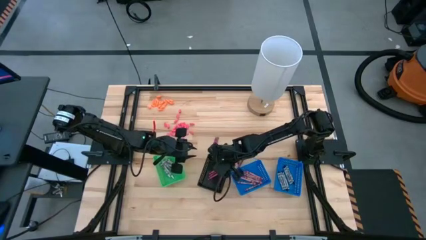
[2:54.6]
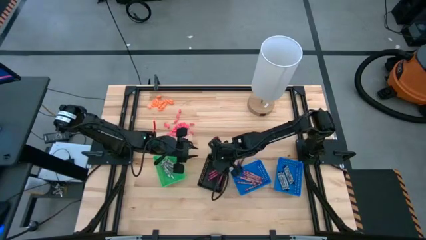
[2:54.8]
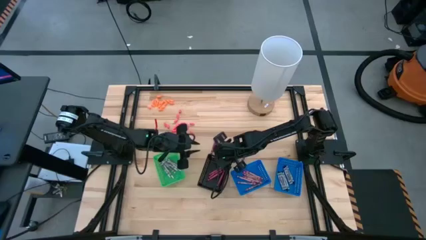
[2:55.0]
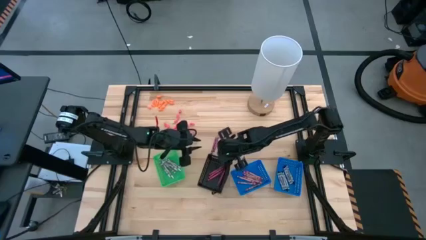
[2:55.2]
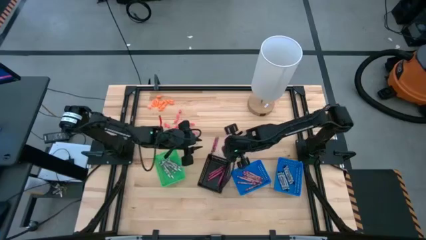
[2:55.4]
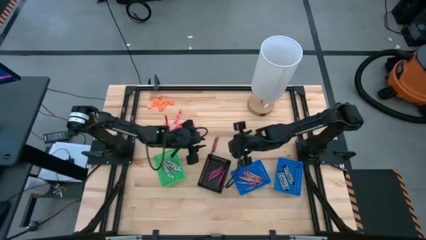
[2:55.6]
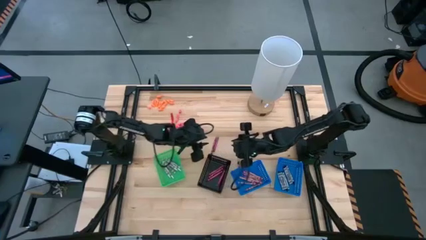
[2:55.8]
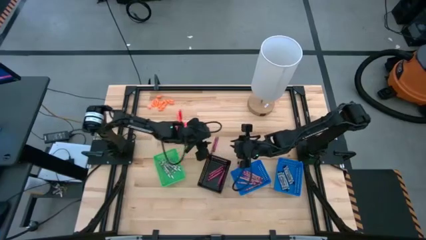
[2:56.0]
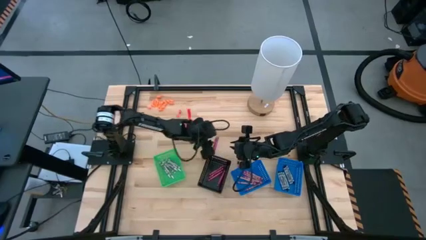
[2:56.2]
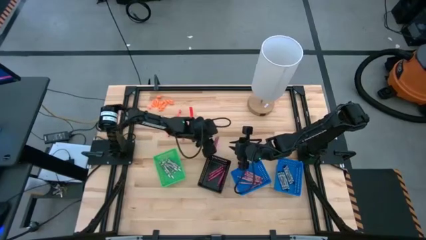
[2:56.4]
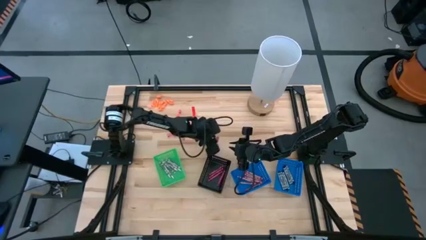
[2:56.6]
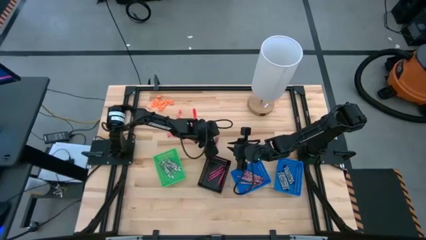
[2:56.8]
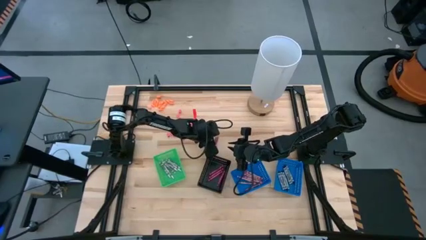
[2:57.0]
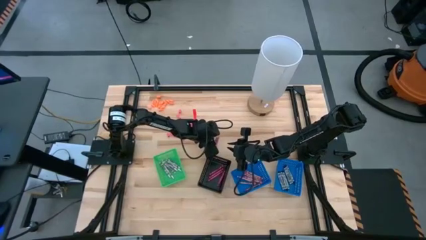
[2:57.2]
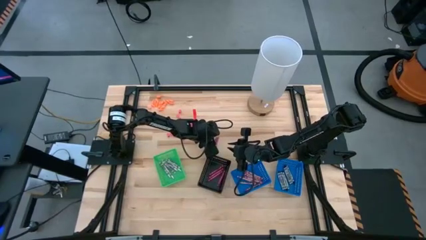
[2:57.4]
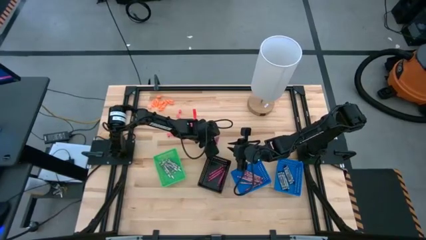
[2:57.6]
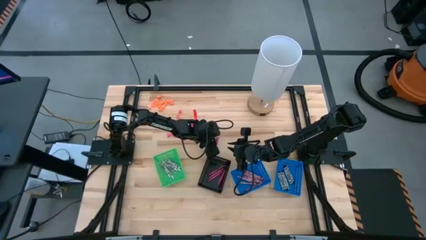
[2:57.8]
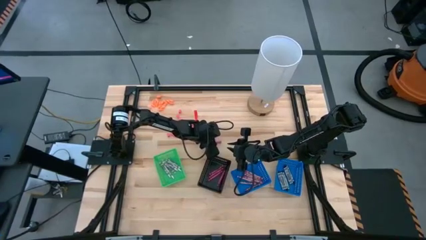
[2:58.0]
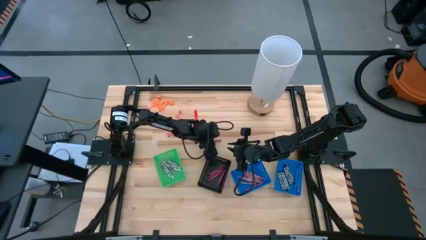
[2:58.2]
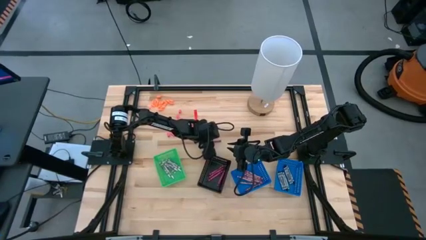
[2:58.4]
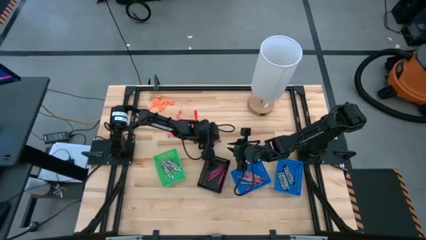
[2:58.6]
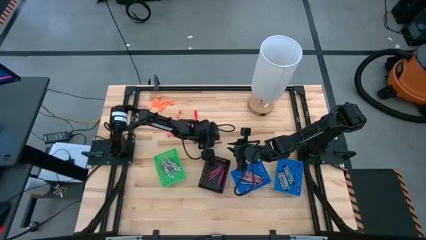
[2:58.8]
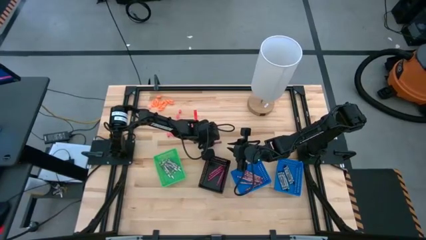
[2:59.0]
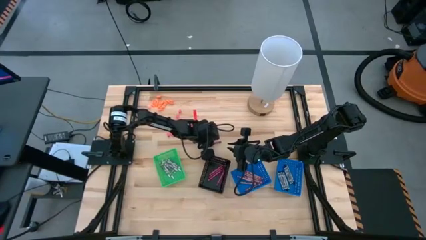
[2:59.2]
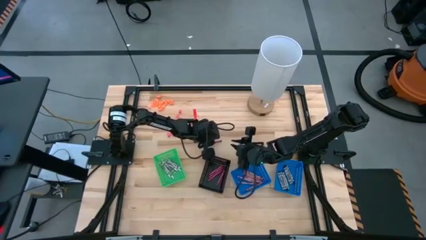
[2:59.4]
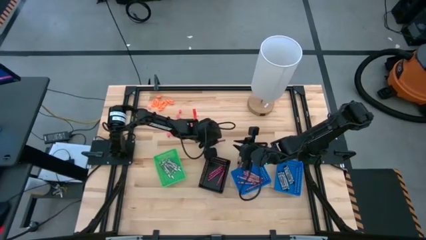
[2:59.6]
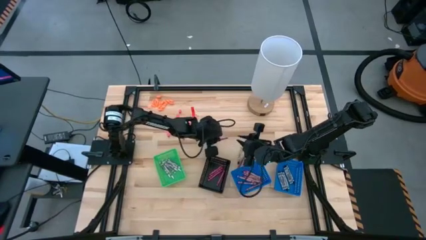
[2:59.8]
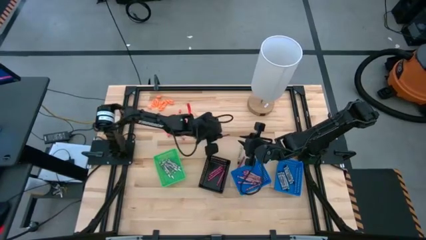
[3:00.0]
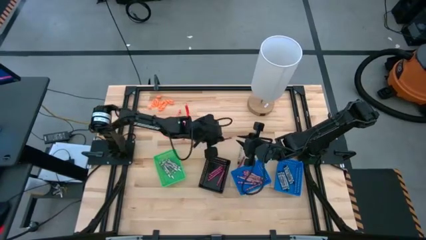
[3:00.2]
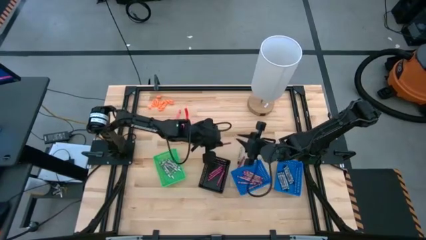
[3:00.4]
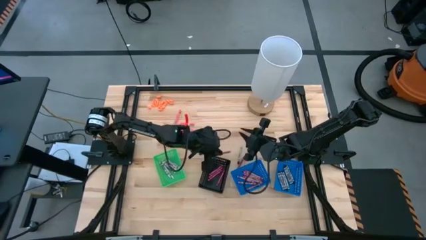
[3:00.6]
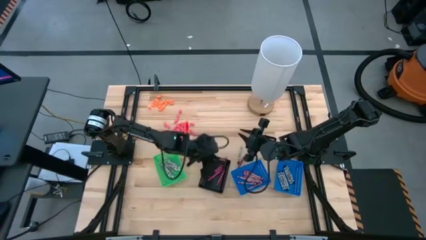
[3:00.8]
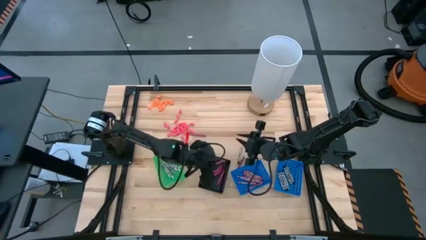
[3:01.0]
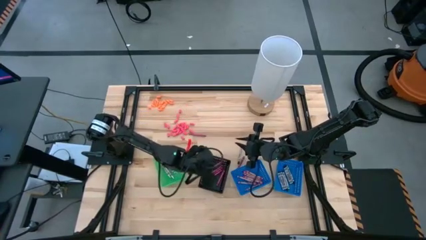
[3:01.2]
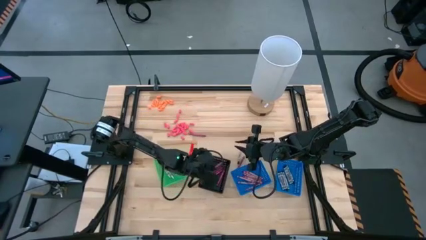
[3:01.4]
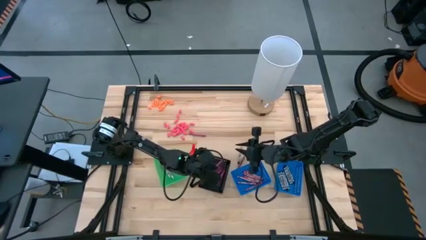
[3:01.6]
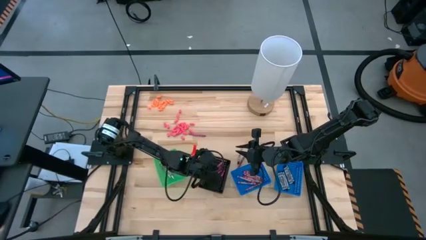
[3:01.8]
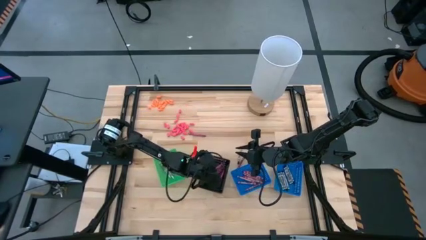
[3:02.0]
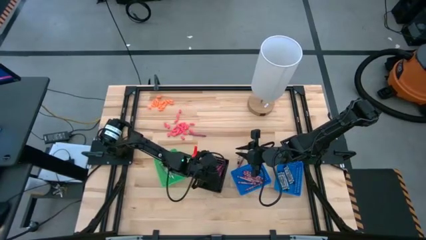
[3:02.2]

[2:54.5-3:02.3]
Task: Sort crayons
Put the red crayon into the black bin

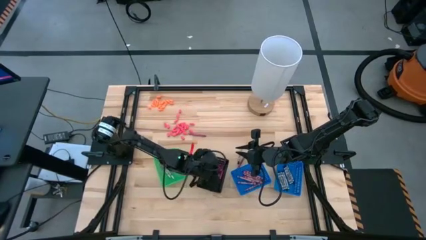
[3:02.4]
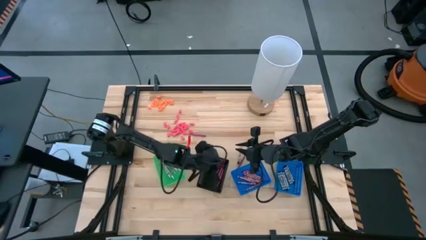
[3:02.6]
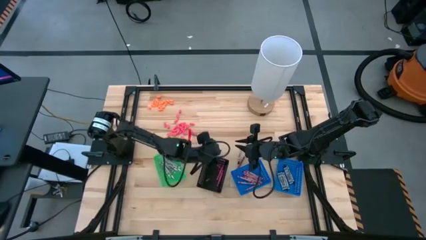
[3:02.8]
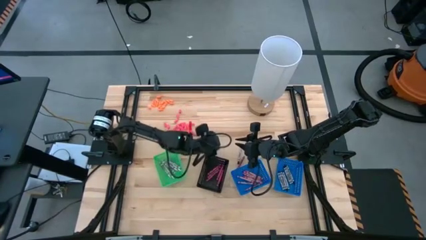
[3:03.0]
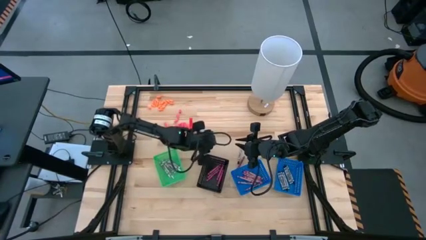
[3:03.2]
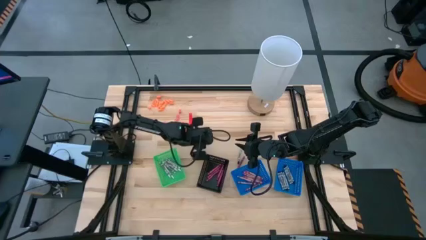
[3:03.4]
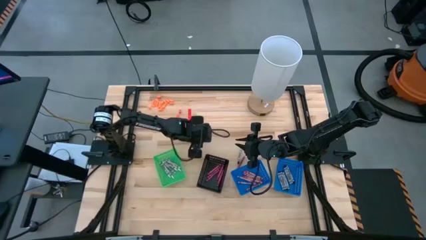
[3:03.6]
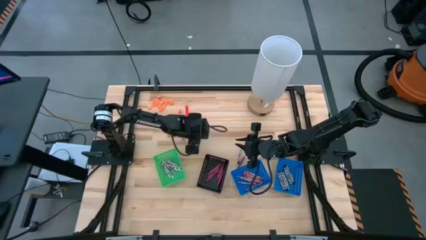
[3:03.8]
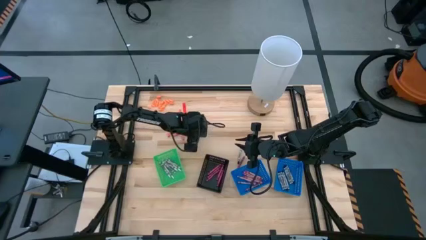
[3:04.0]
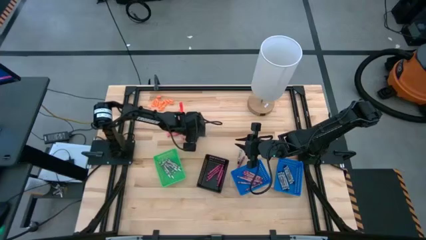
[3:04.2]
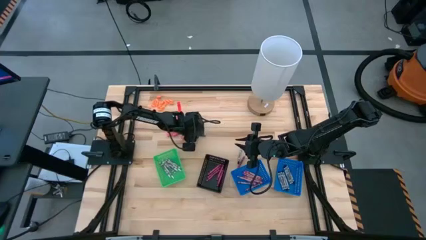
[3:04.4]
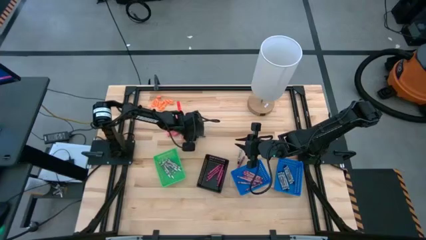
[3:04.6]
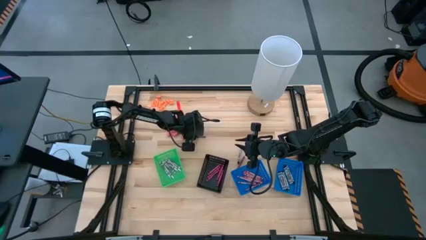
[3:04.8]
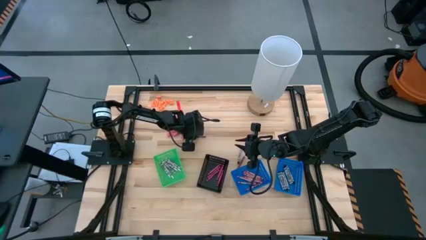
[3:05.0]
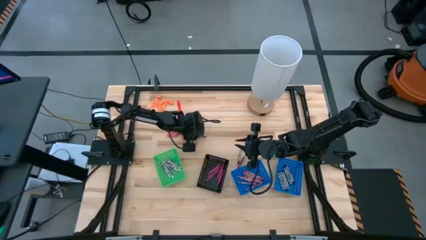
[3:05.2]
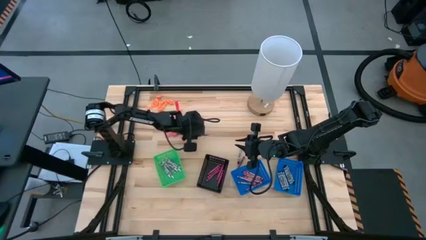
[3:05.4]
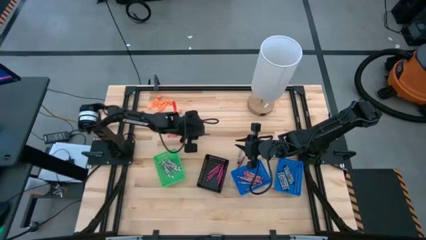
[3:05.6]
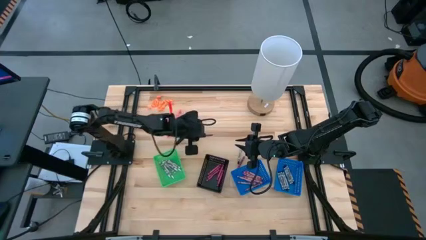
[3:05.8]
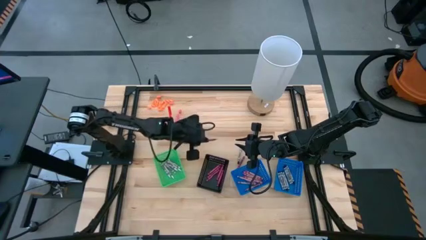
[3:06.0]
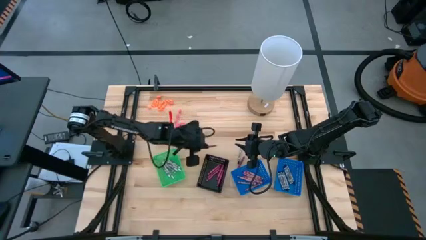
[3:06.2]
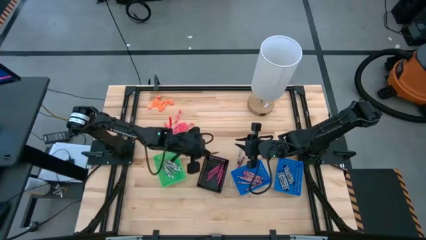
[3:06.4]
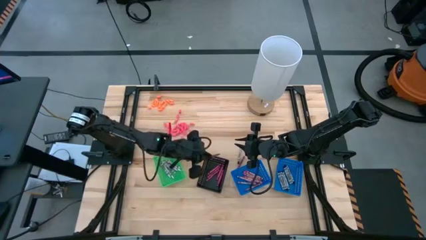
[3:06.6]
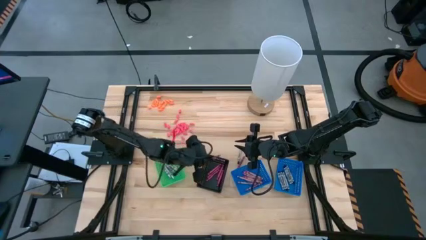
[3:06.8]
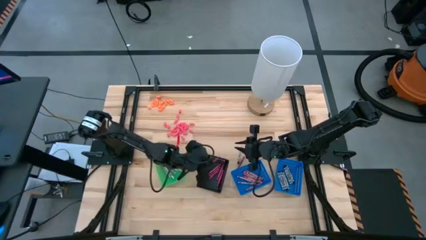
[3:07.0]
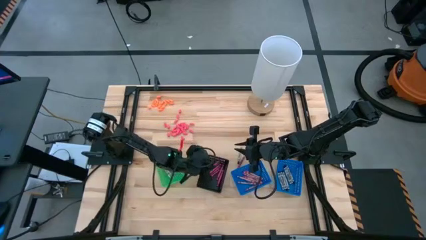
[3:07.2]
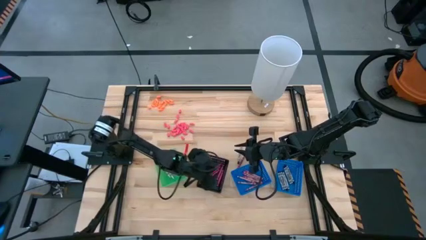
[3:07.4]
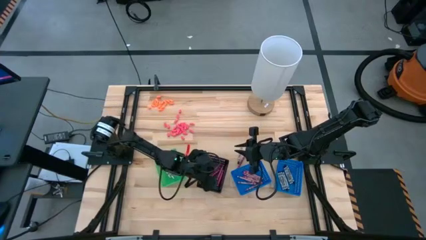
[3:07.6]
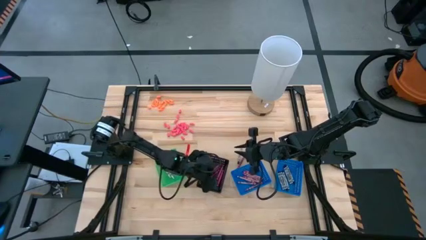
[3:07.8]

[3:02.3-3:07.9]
Put the red crayon into the black bin

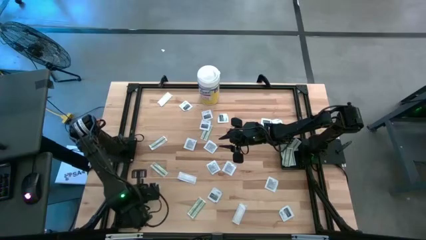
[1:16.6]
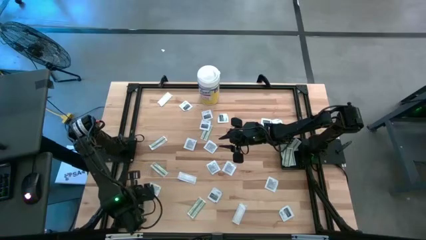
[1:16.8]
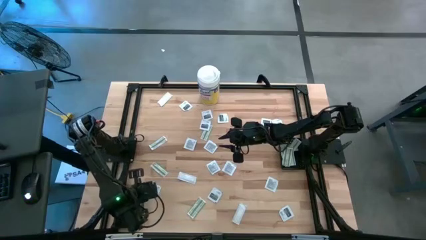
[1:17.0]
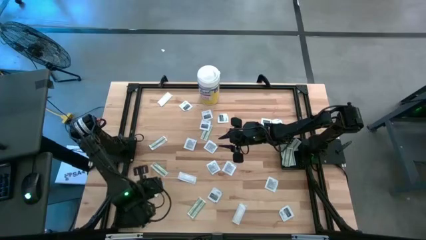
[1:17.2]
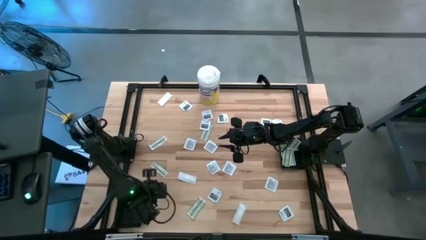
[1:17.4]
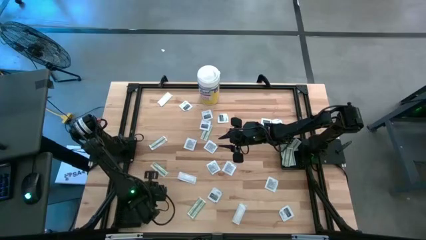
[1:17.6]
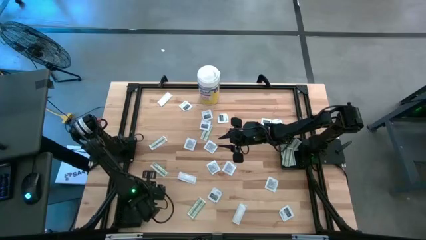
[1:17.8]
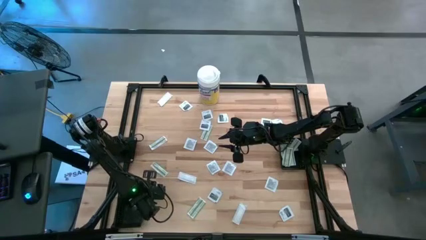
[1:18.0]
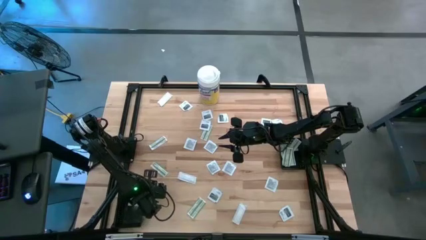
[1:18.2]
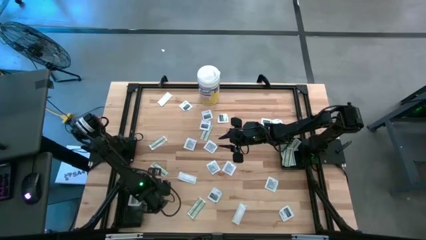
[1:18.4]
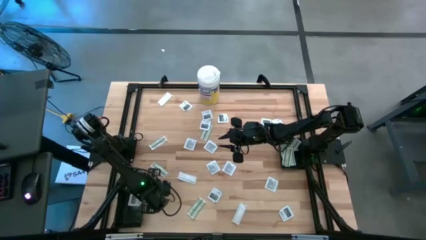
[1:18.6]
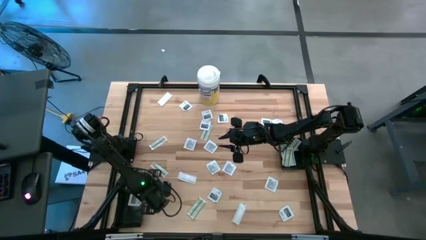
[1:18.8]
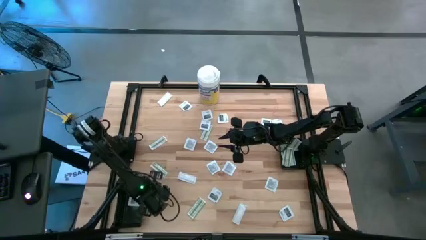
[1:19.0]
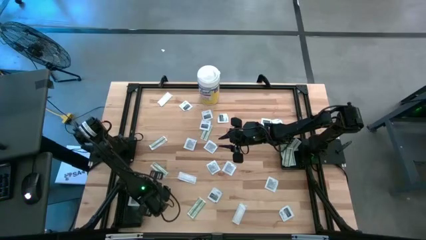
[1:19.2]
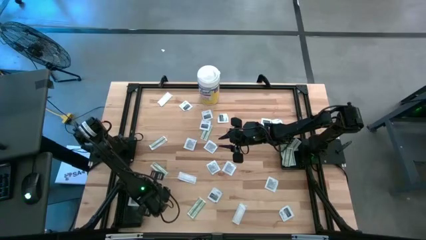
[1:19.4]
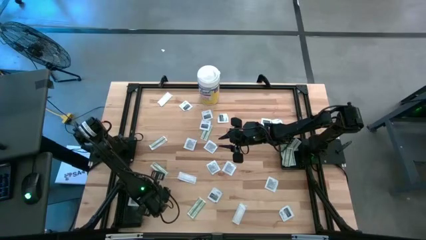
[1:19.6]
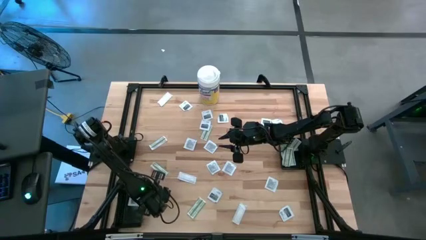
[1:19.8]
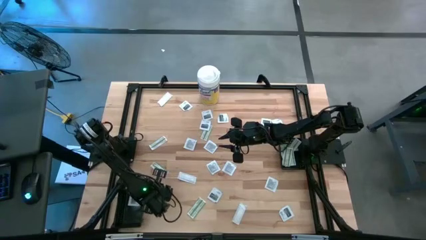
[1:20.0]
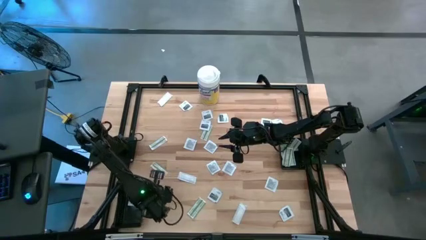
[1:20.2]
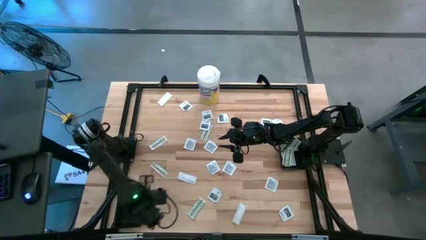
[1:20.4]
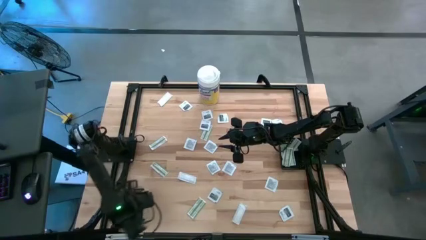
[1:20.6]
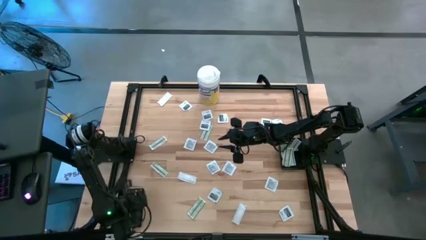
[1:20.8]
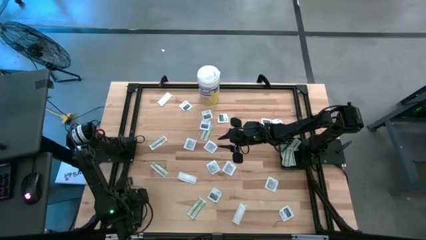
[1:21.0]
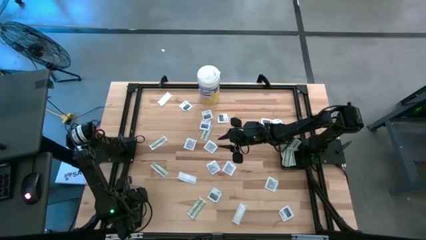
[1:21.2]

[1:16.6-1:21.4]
Task: Pick & Place First Aid Supplies
Put the white towelette sachet into the left black bin
